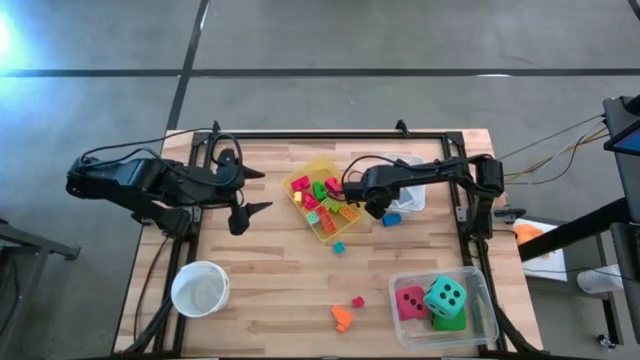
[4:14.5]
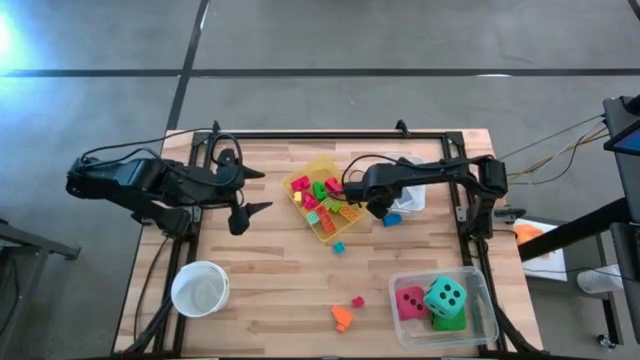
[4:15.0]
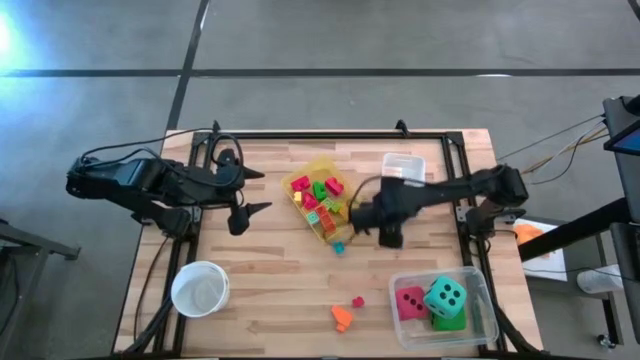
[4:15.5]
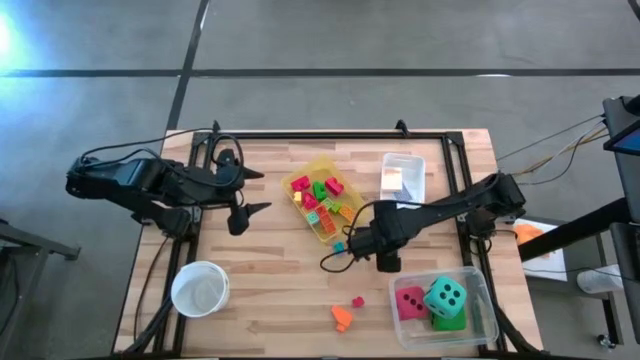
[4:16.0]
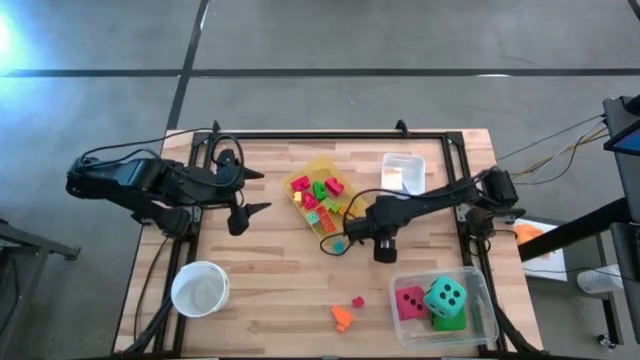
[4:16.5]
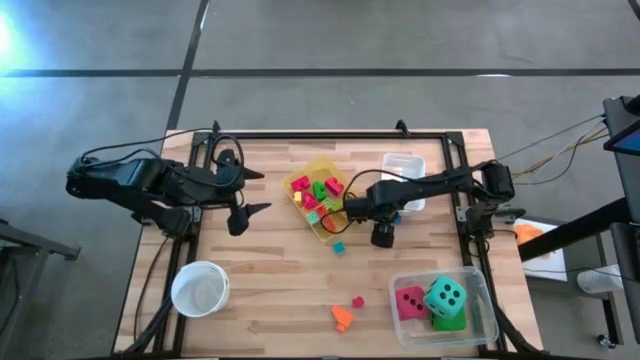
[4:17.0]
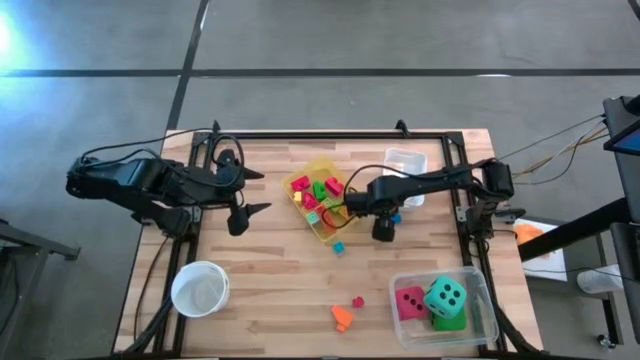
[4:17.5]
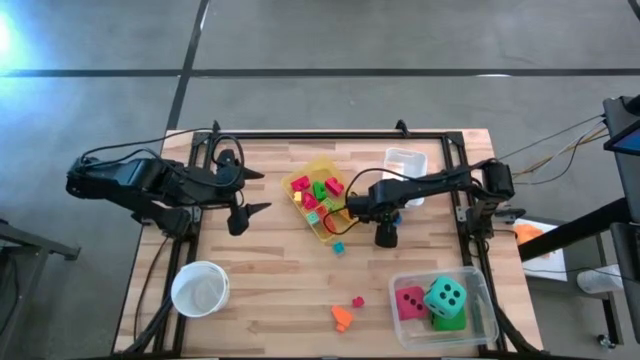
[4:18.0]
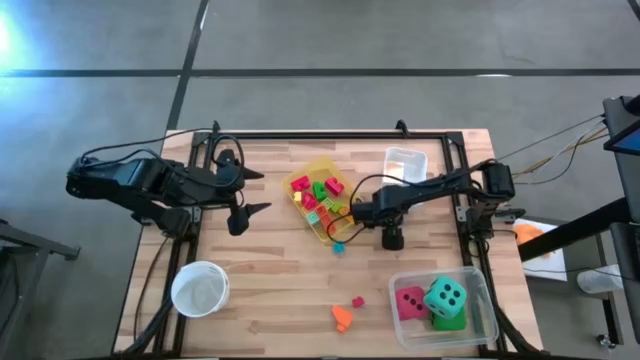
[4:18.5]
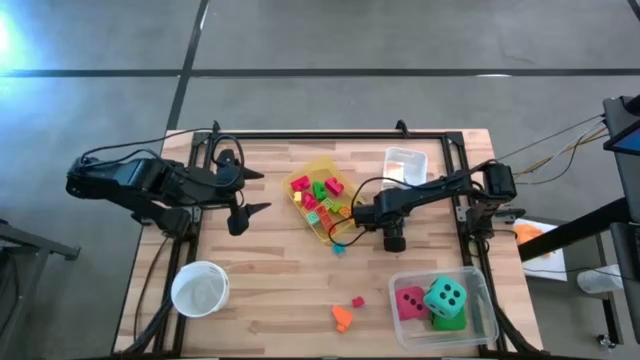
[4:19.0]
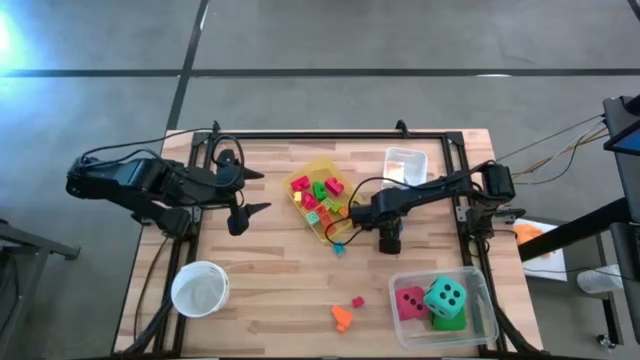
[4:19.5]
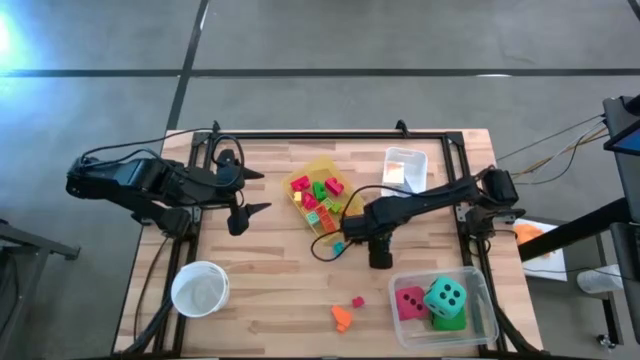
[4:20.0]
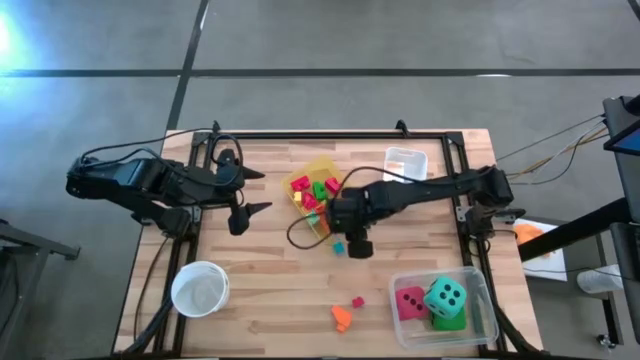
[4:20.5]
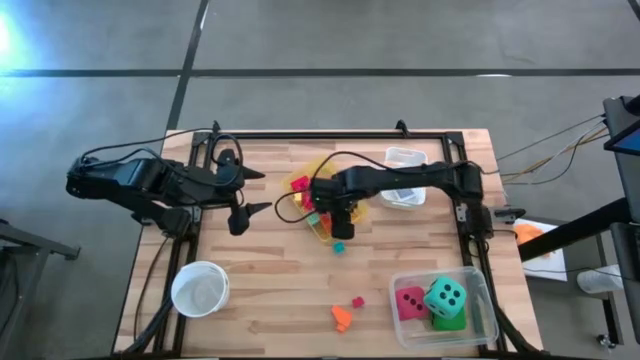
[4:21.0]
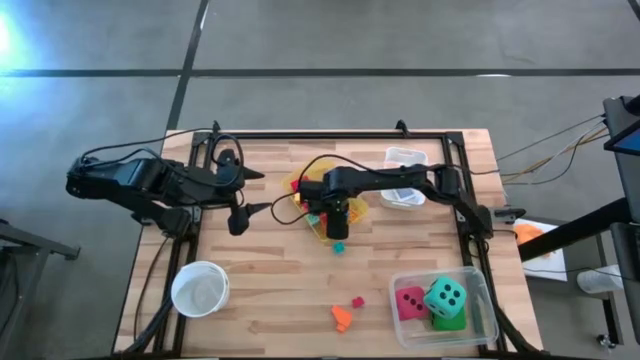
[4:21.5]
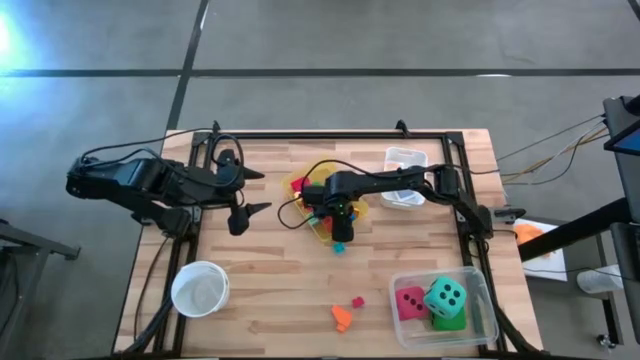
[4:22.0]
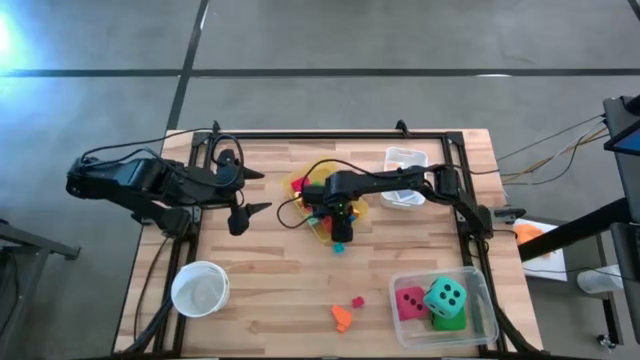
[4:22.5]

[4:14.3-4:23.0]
Task: Pick & Place Toys
Put the blue game piece into the yellow bin

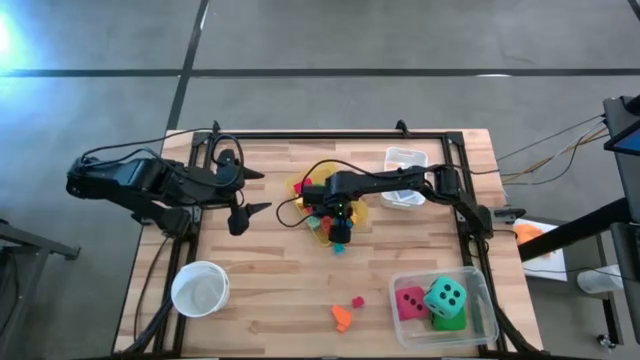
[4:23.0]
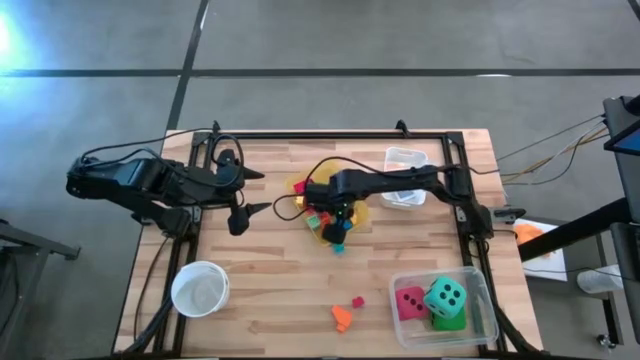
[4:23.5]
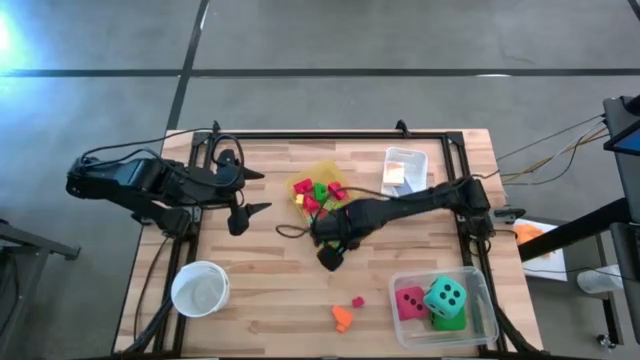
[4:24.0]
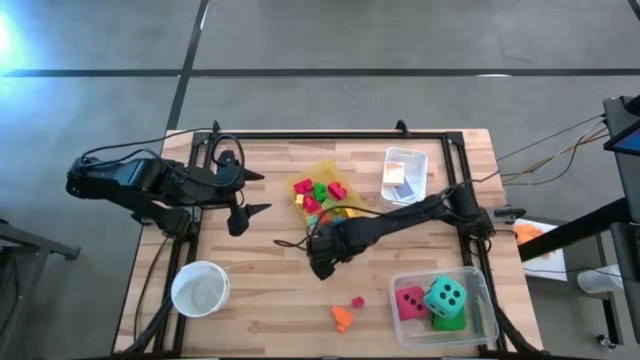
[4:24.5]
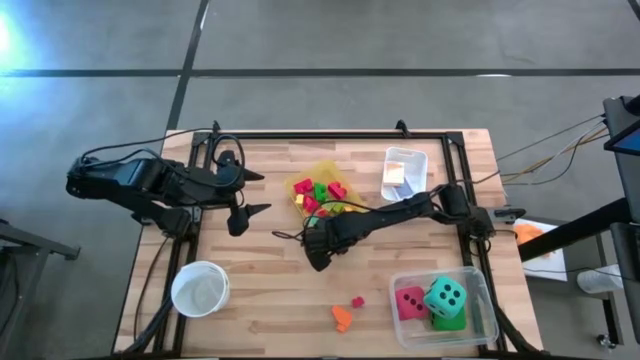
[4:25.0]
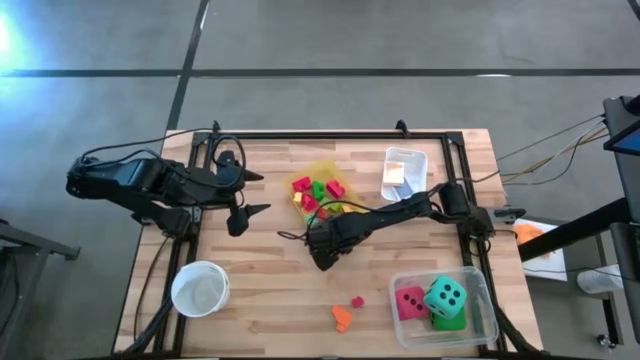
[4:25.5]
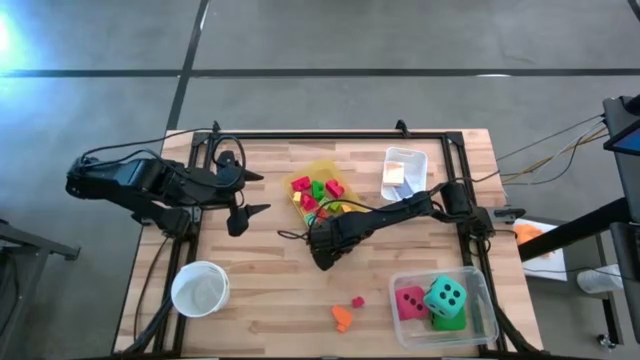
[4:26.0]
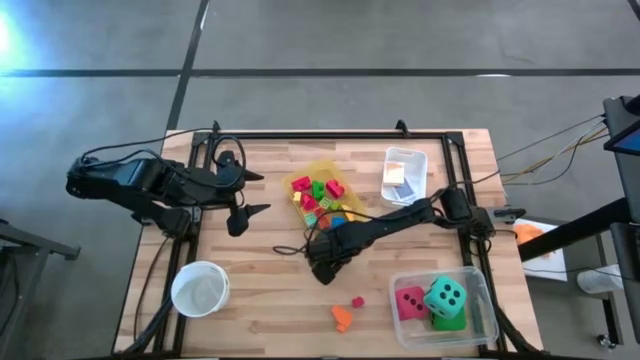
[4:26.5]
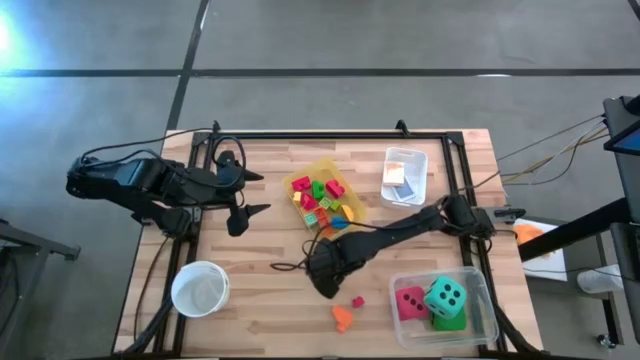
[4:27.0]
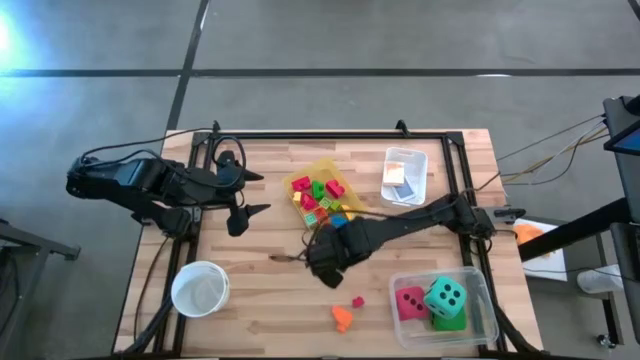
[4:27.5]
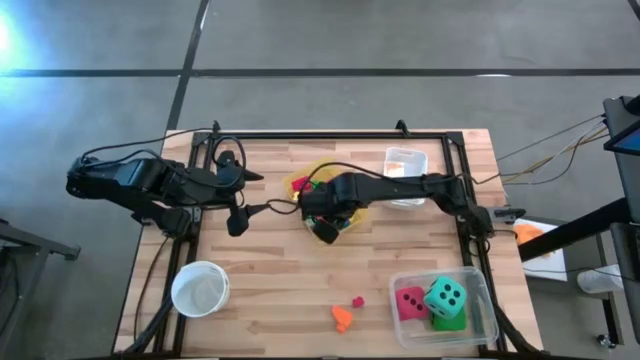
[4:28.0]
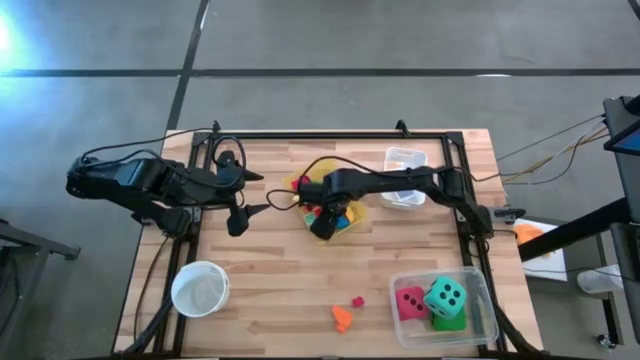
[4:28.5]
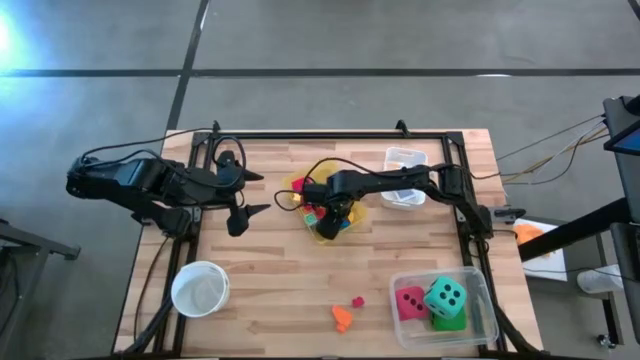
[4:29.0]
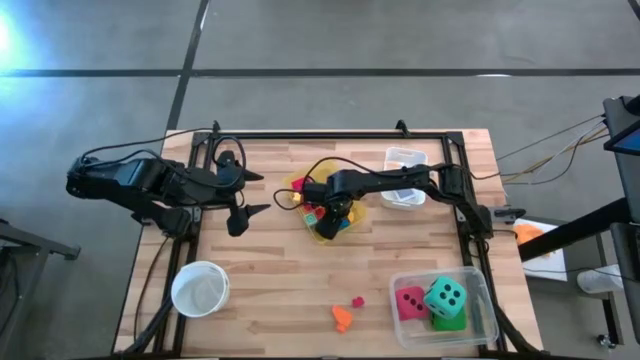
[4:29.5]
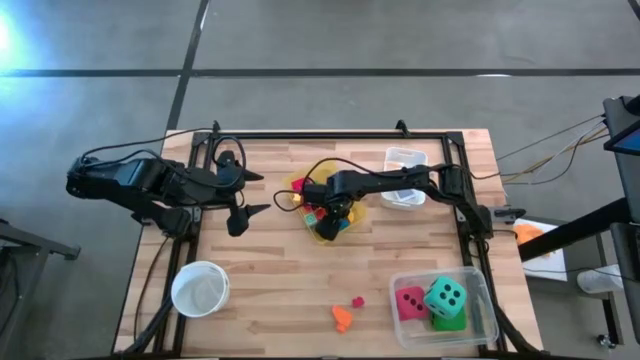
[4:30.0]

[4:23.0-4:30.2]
Put the light blue game piece into the yellow bin

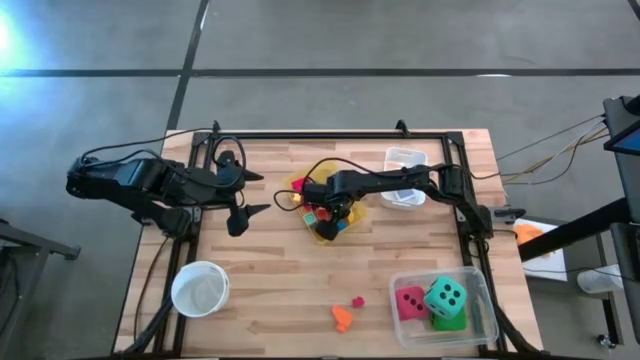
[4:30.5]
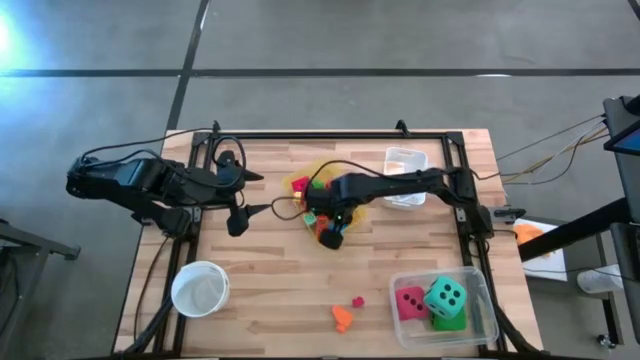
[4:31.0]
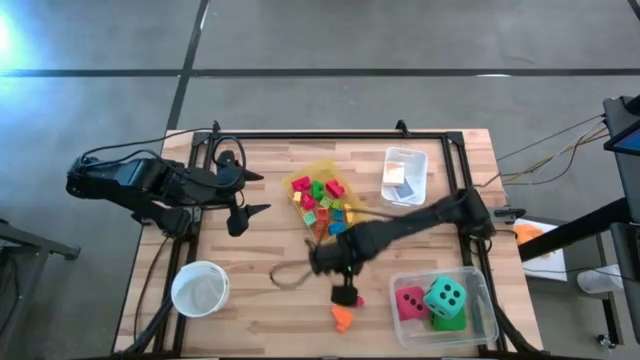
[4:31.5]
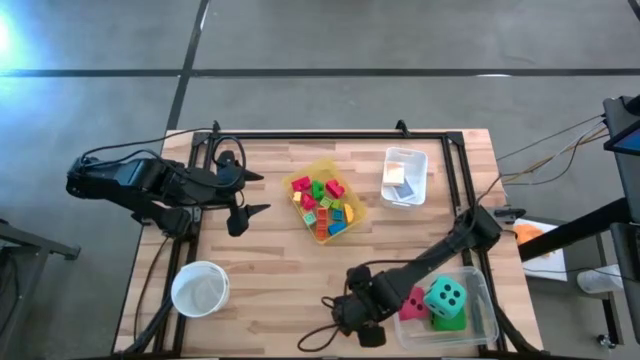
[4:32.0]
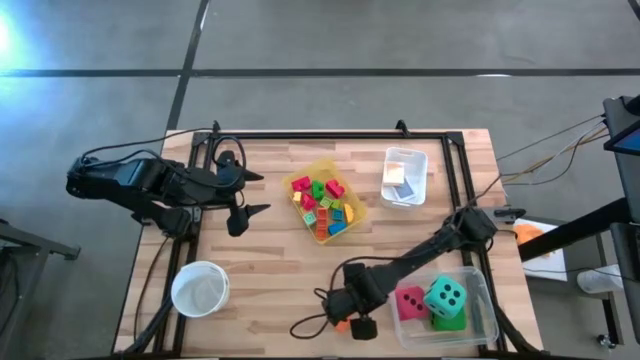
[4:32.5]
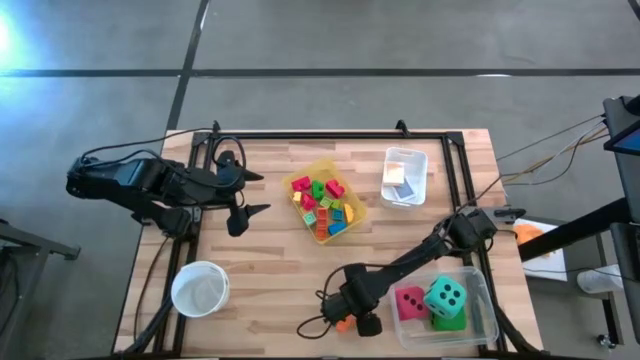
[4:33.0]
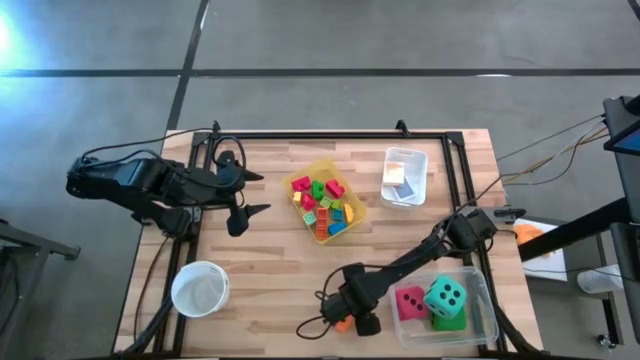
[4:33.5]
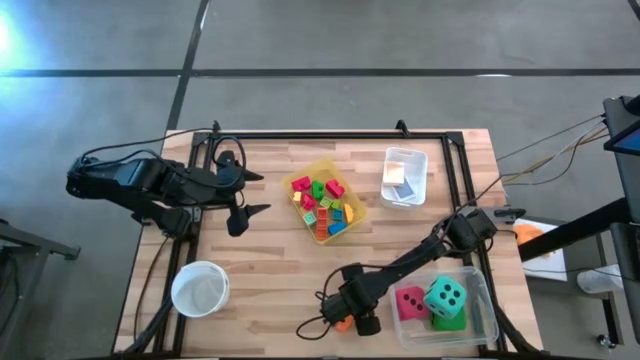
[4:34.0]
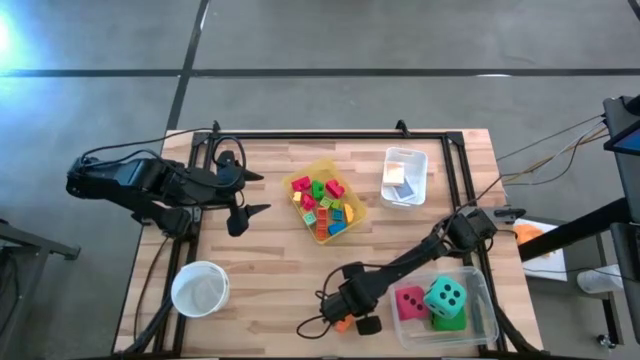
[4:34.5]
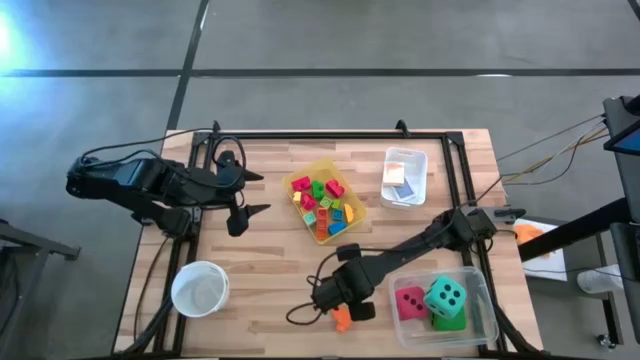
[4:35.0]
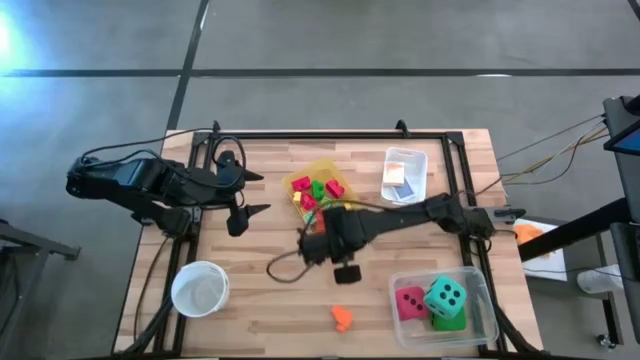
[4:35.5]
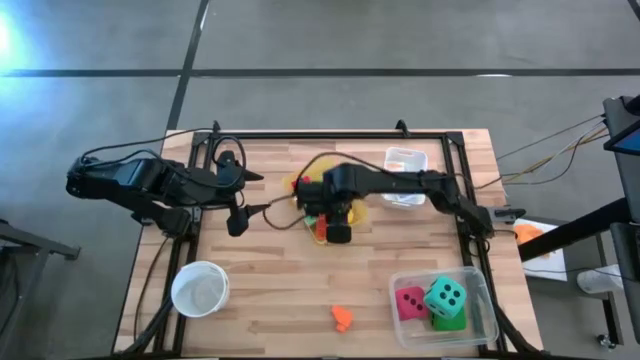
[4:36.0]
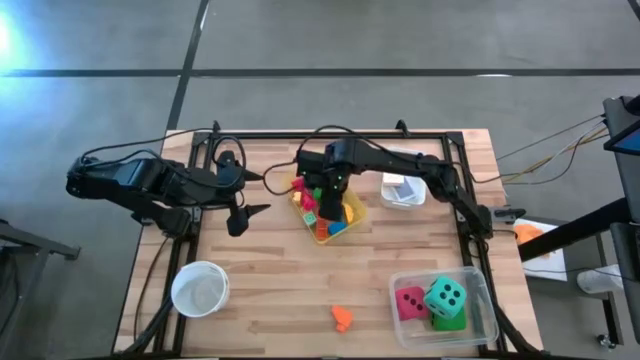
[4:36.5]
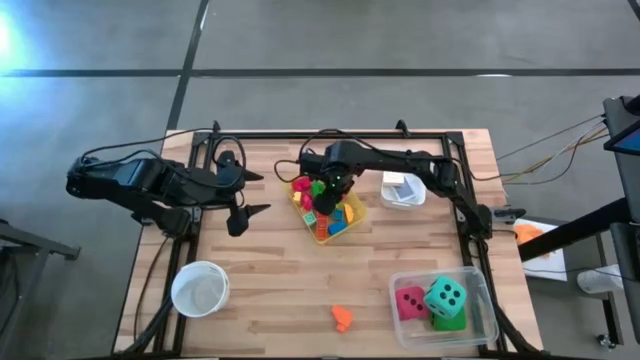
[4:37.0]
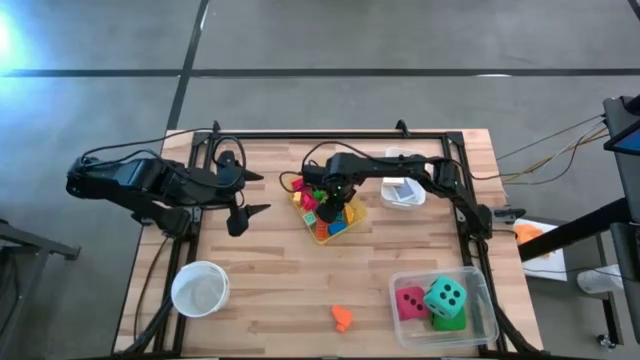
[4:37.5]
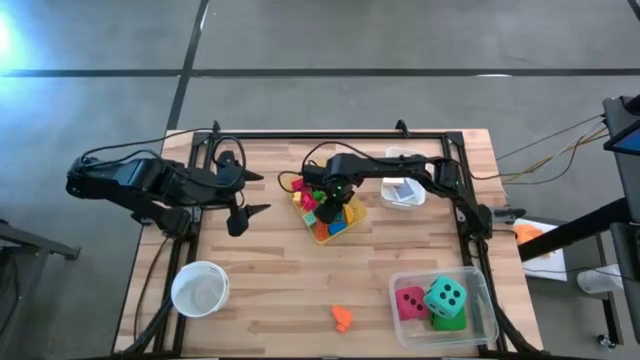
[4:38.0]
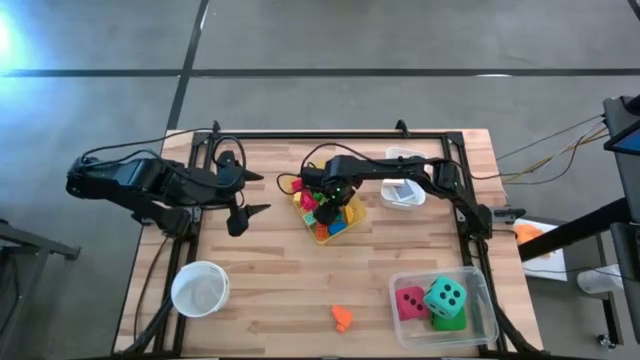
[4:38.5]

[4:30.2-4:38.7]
Put the red game piece into the yellow bin
